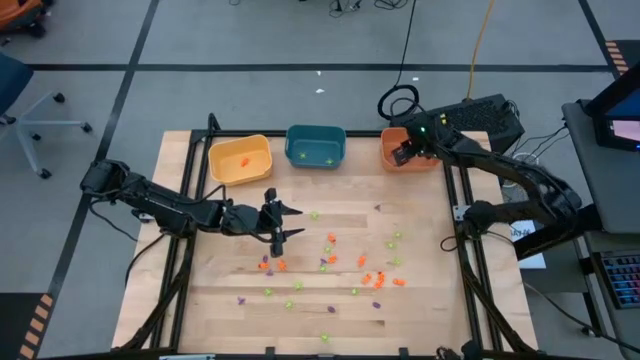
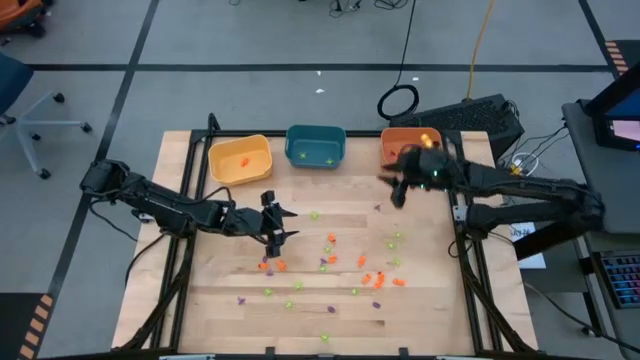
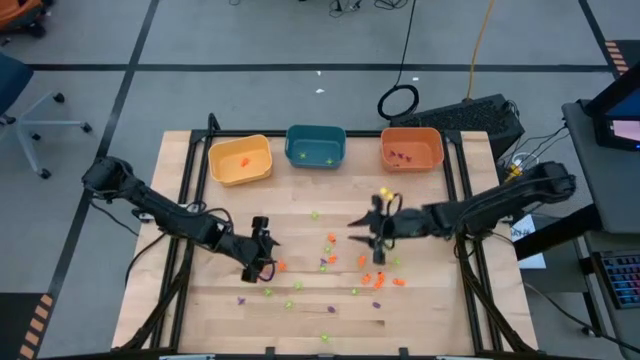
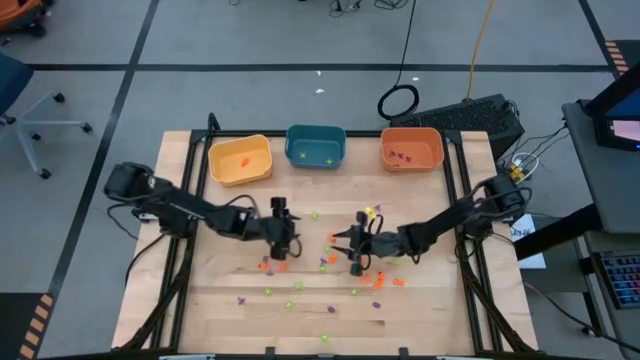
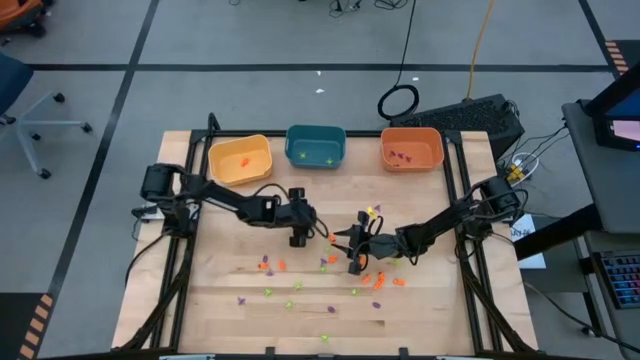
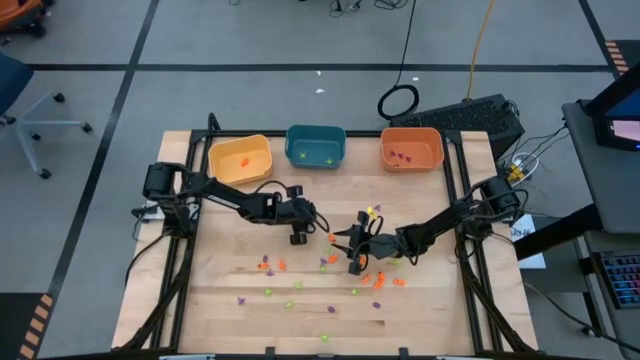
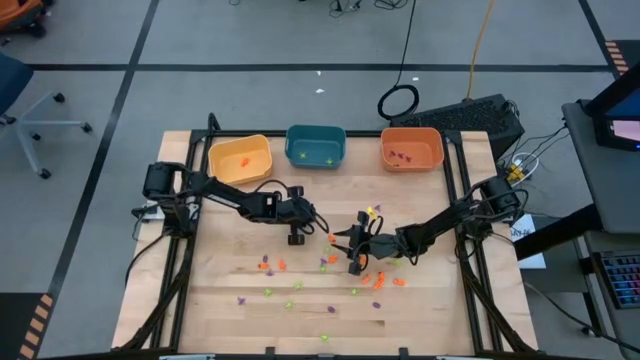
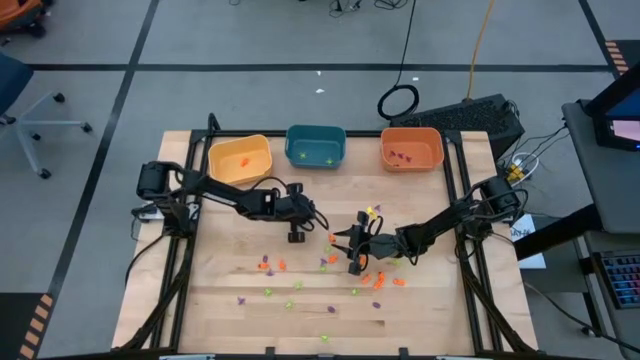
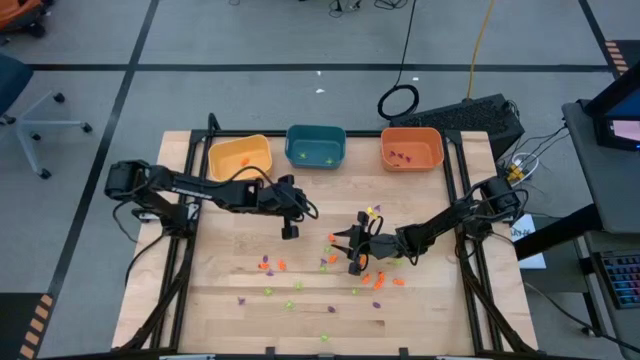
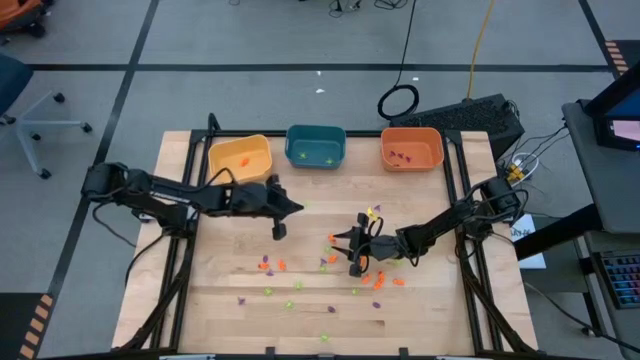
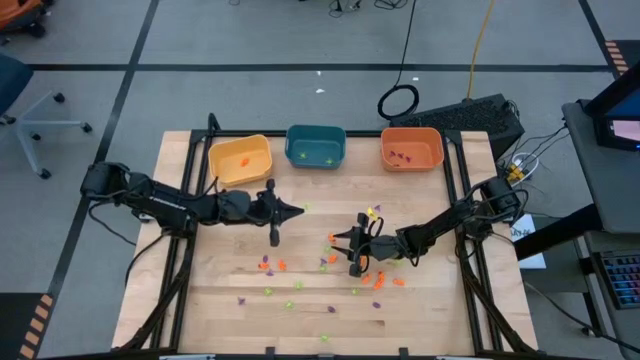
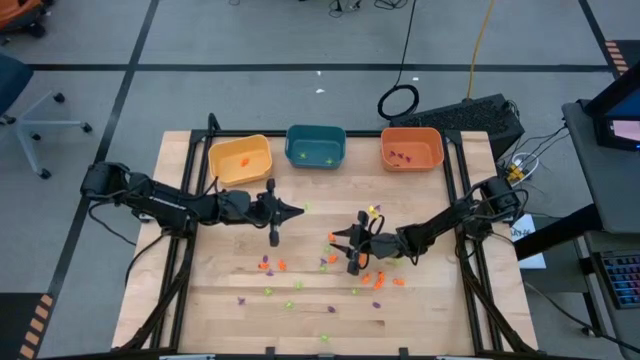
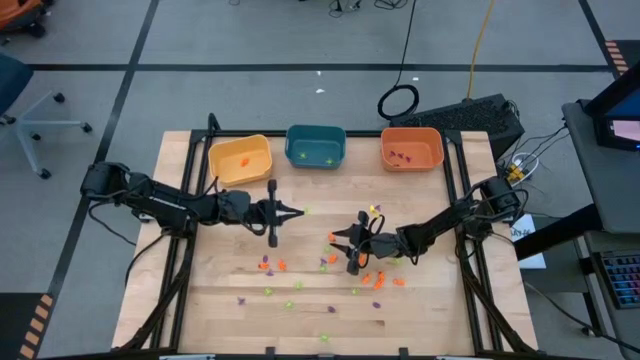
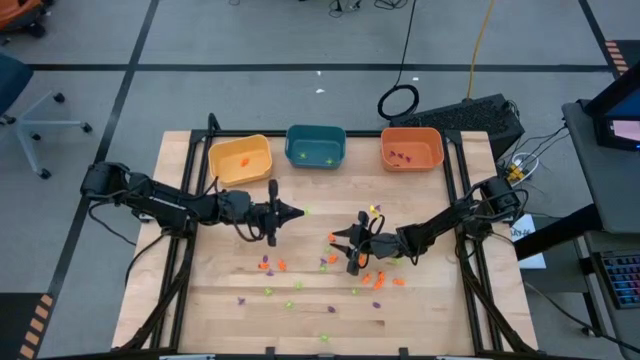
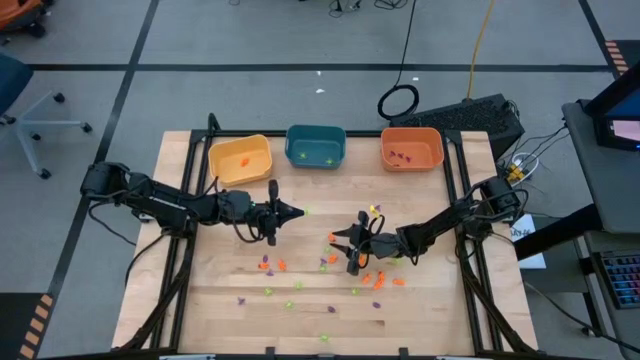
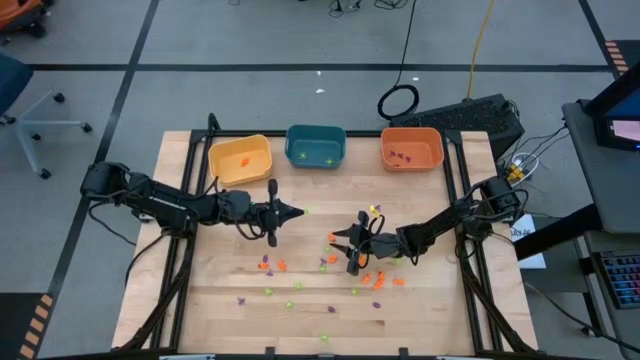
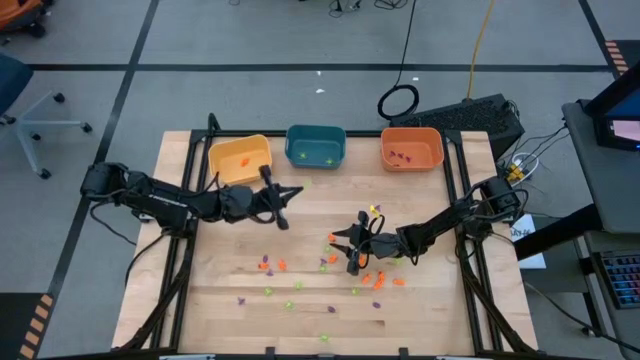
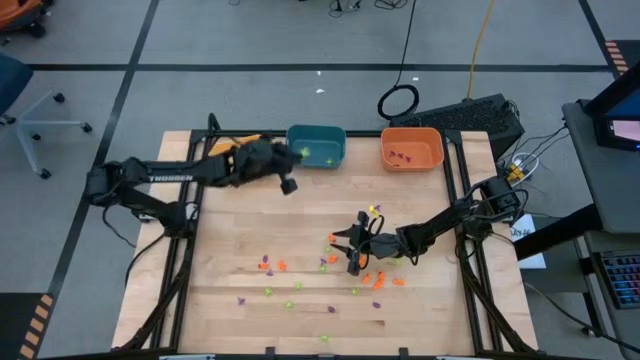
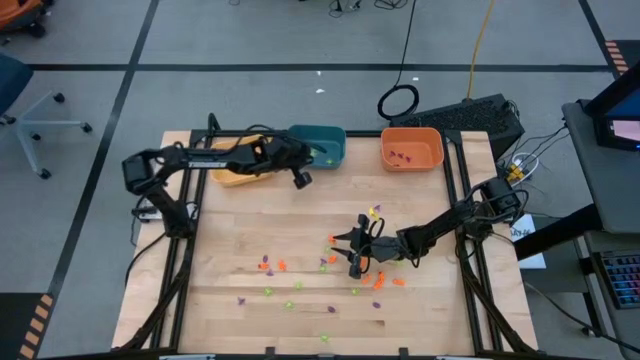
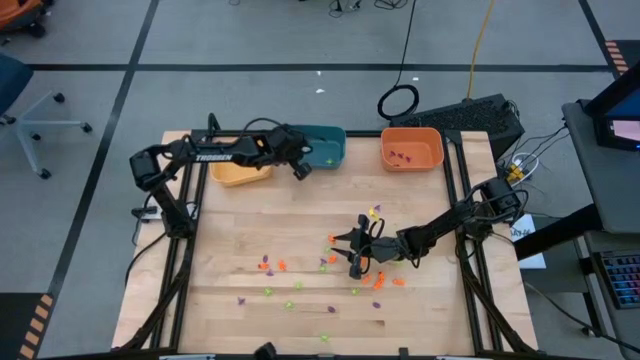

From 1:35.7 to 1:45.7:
Task: Sort Halloween decoration
Put the green spider toy into the blue bin

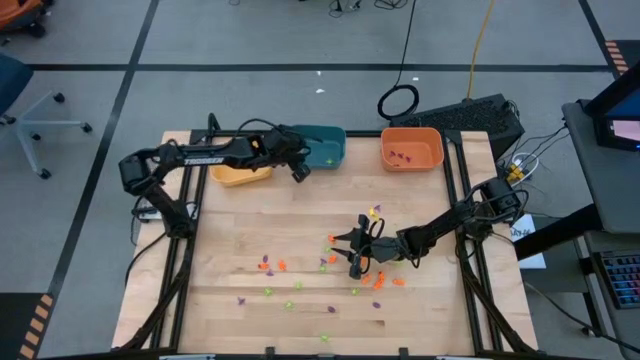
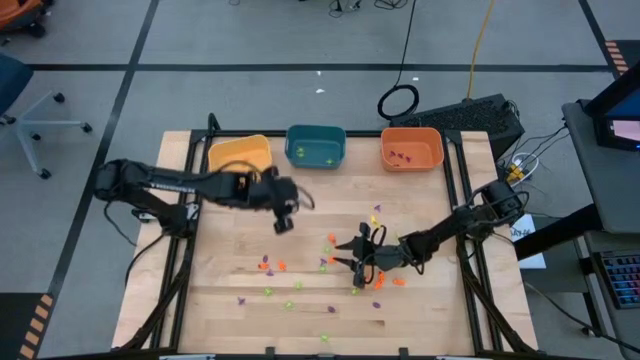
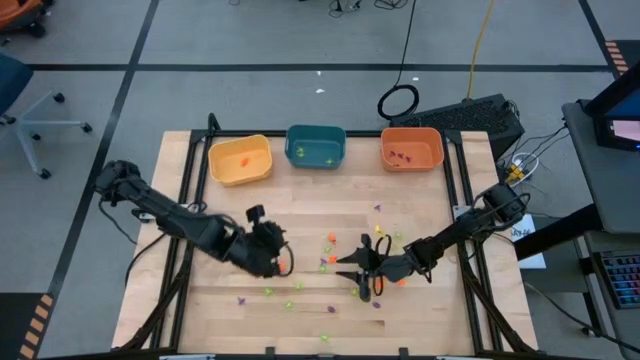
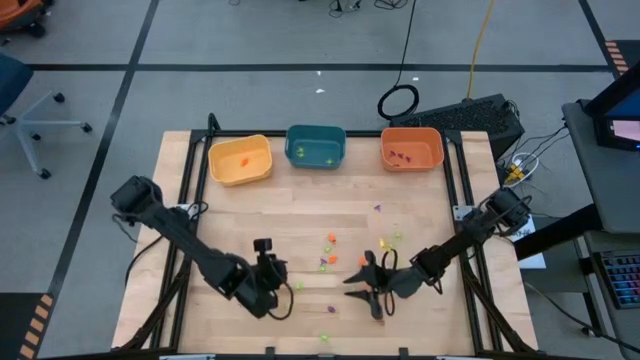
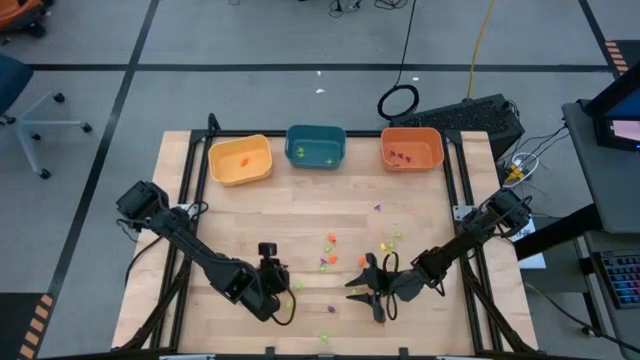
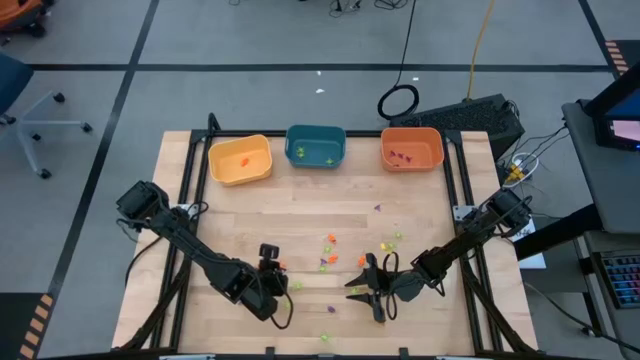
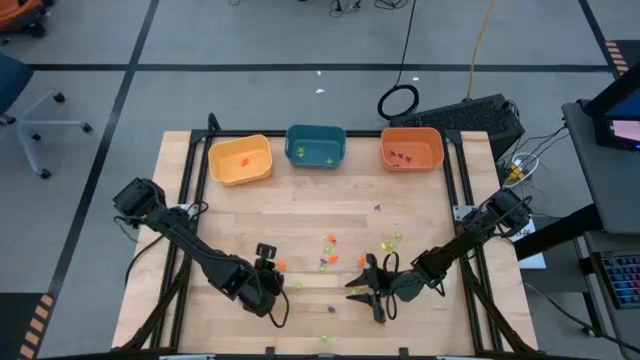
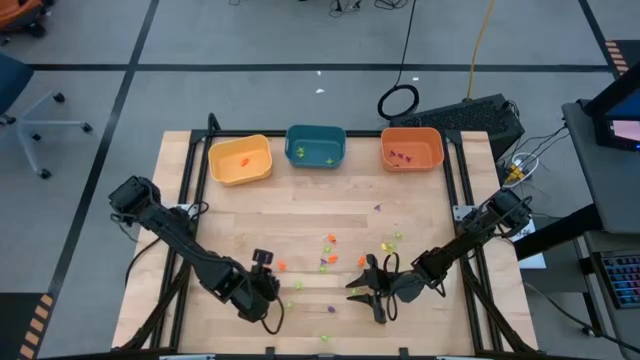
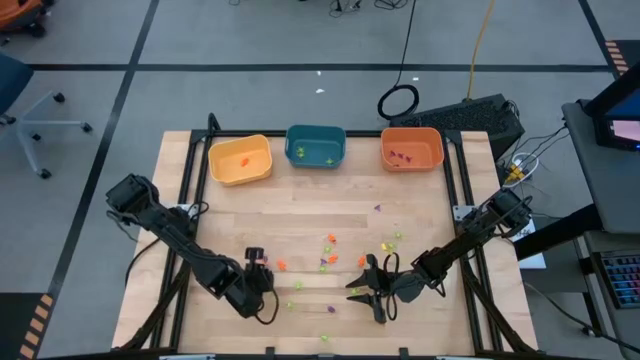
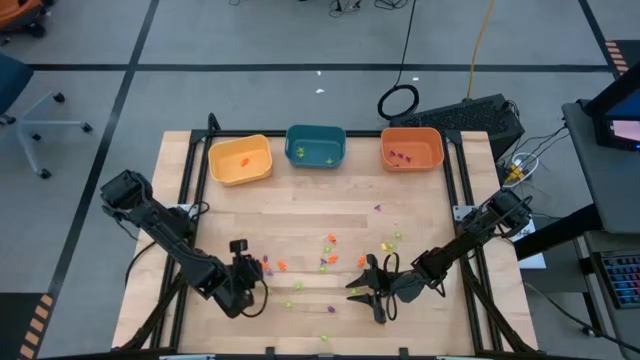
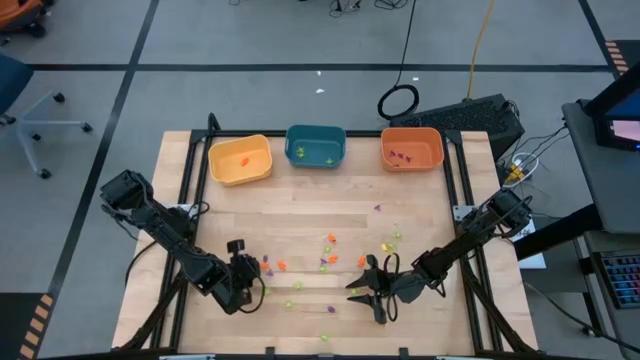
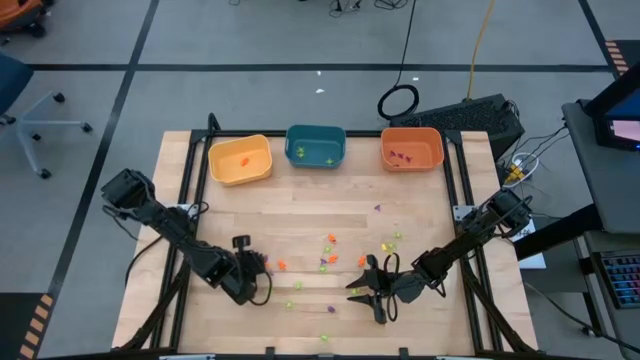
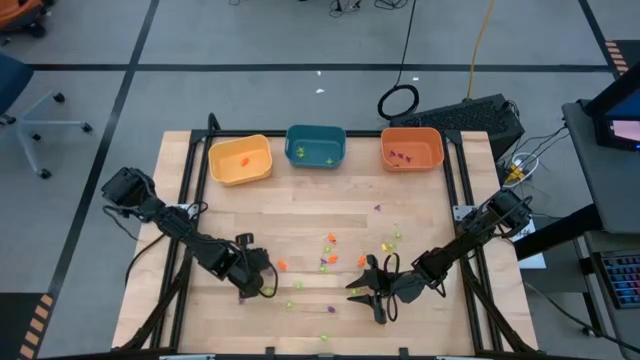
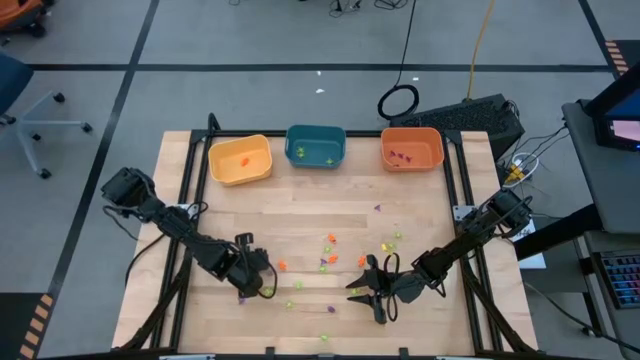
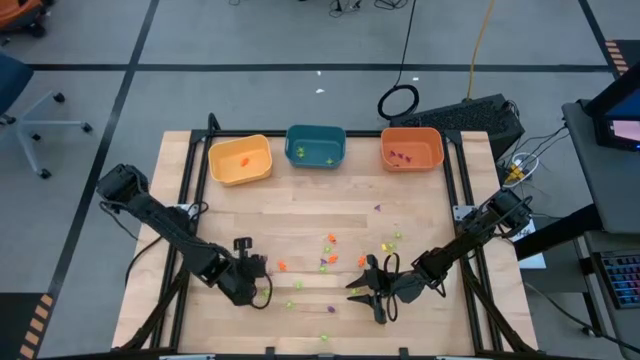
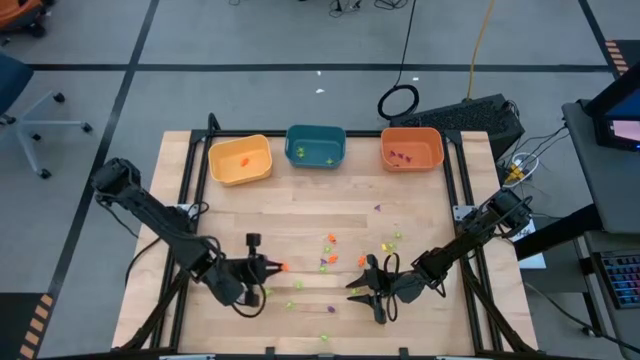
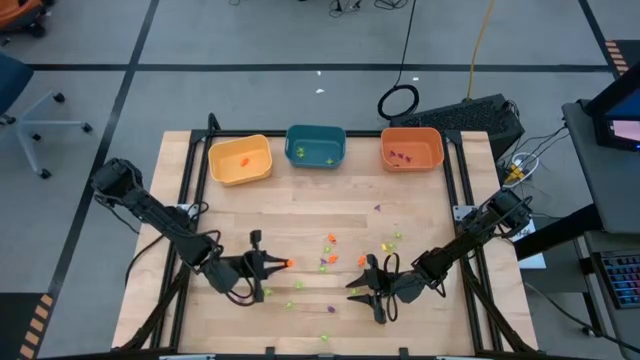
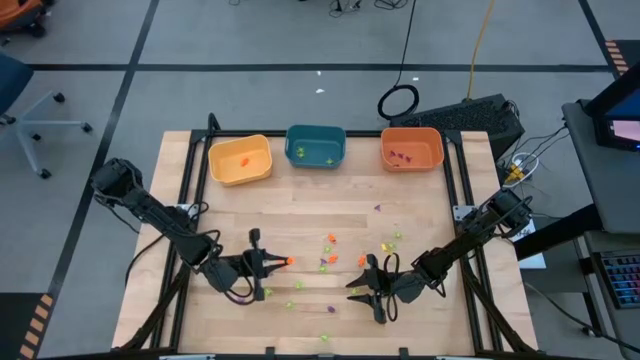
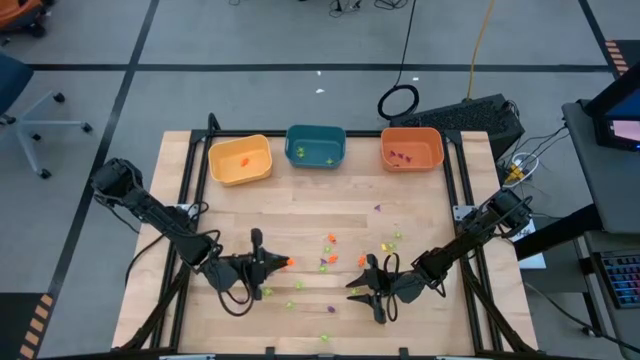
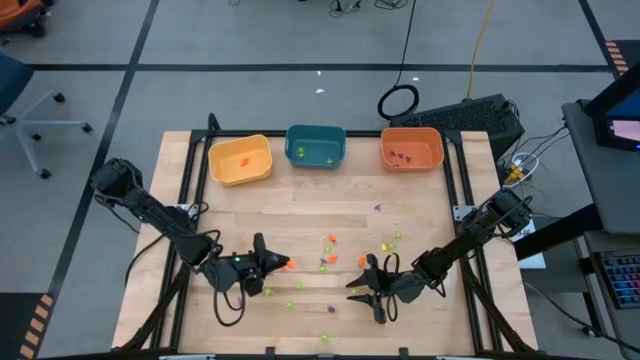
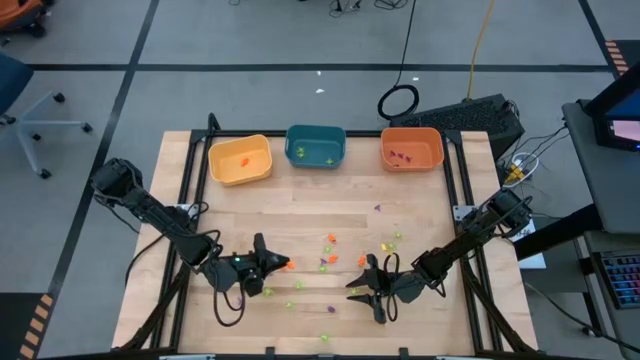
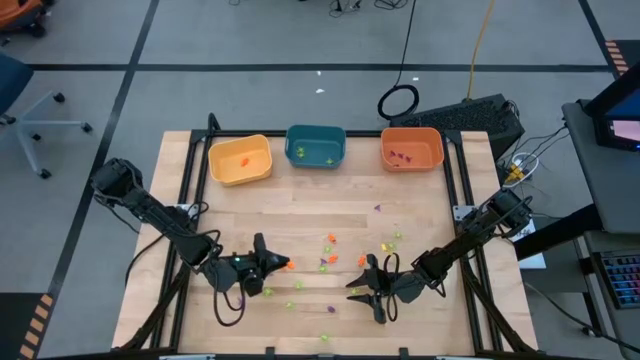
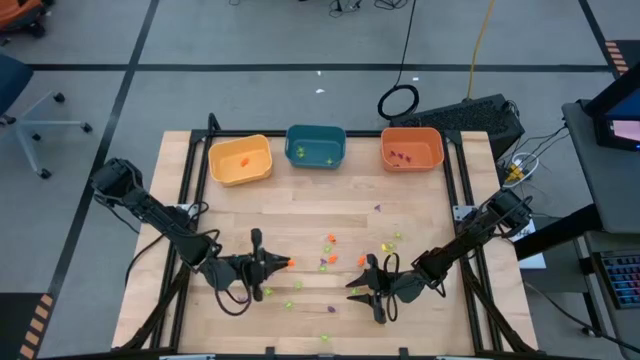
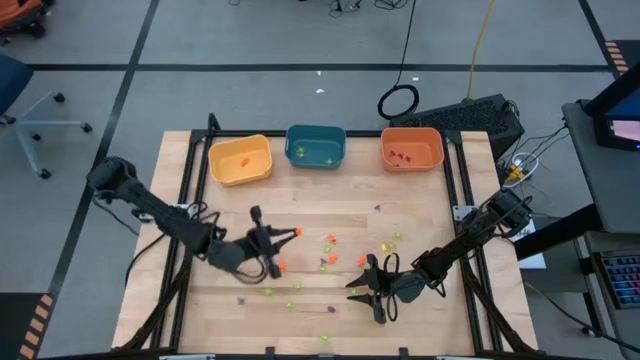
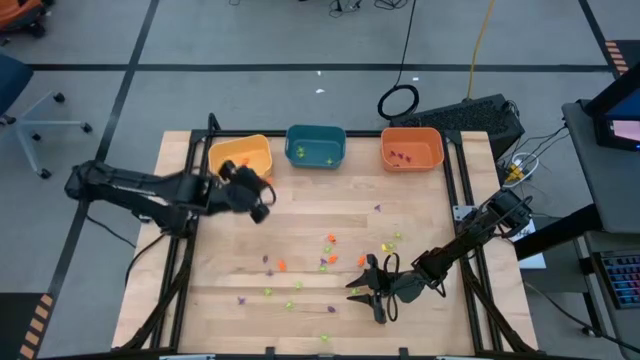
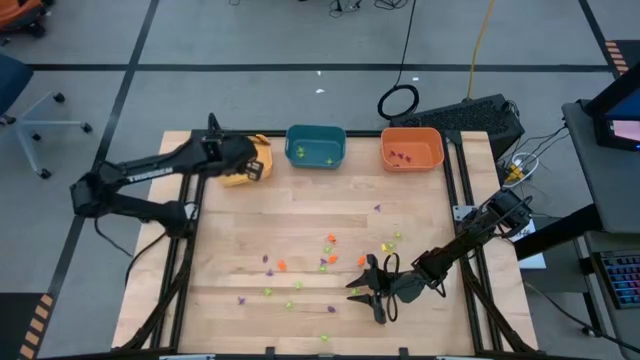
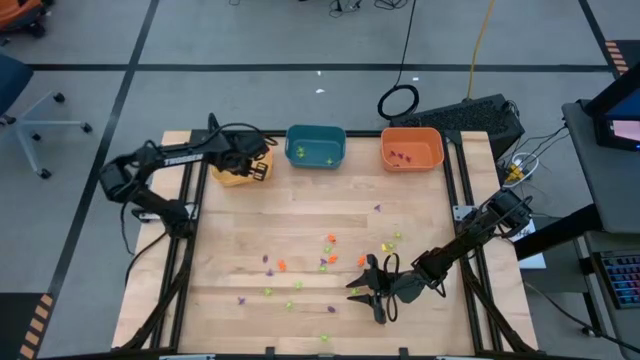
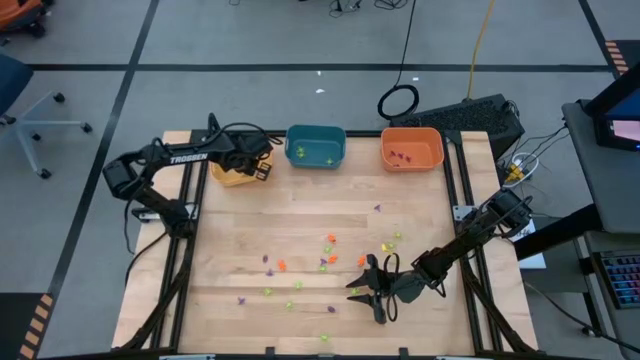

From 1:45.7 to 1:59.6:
Put the orange skeleton toy into the yellow bin
